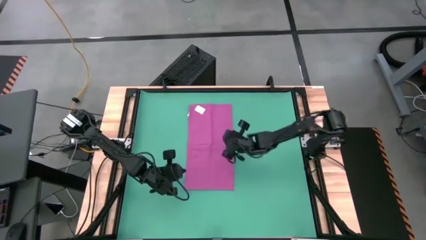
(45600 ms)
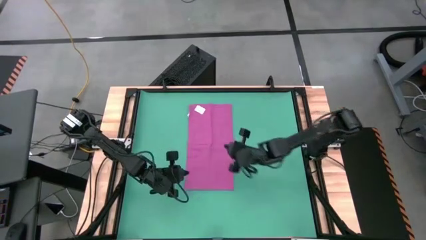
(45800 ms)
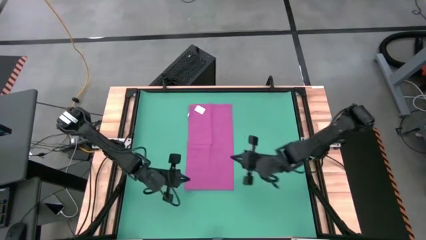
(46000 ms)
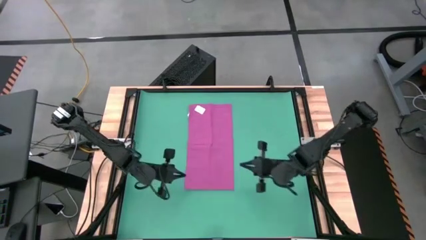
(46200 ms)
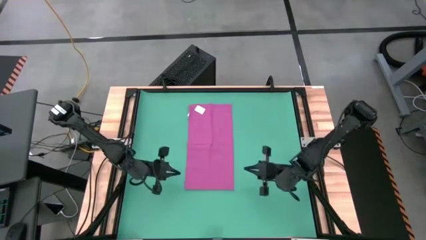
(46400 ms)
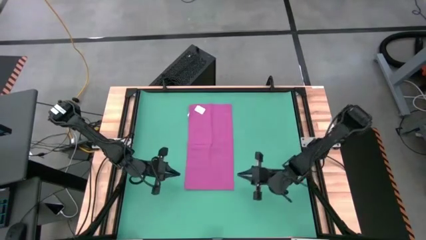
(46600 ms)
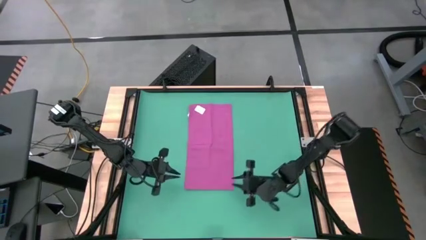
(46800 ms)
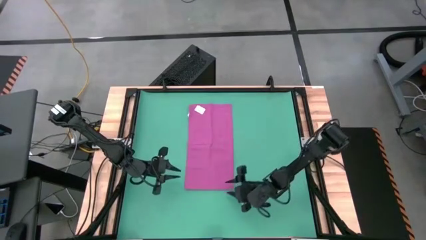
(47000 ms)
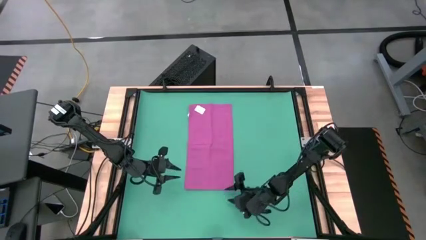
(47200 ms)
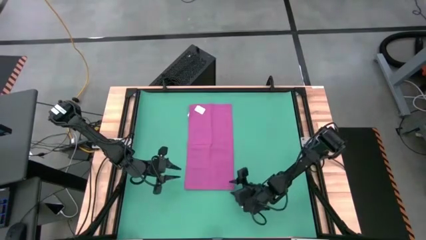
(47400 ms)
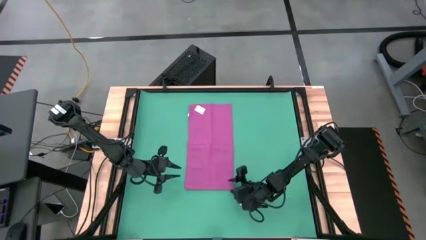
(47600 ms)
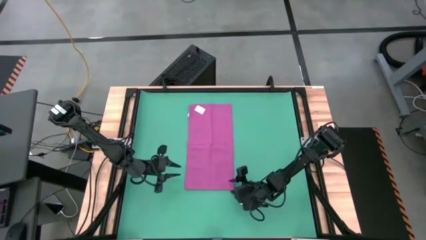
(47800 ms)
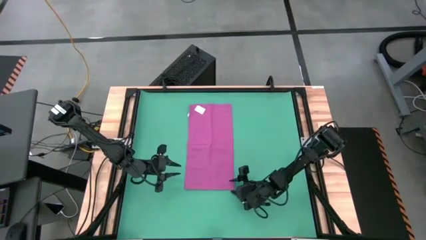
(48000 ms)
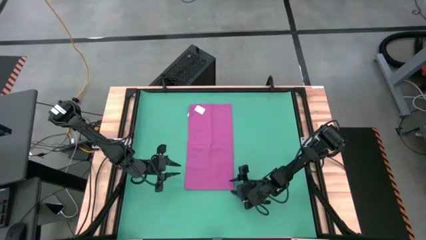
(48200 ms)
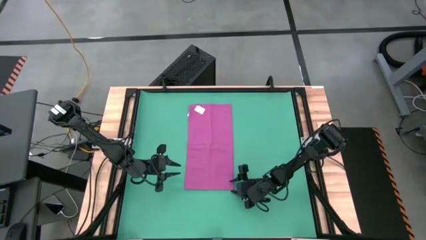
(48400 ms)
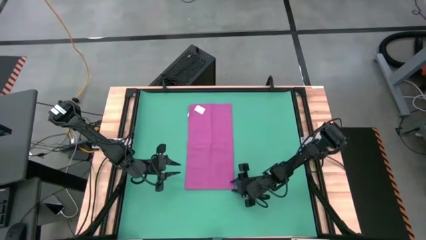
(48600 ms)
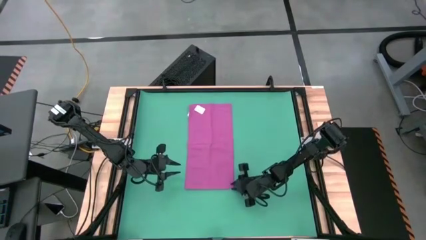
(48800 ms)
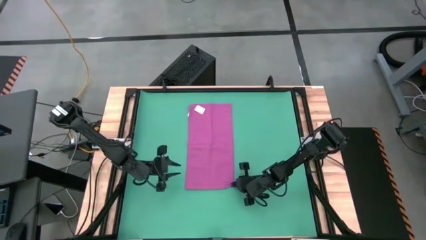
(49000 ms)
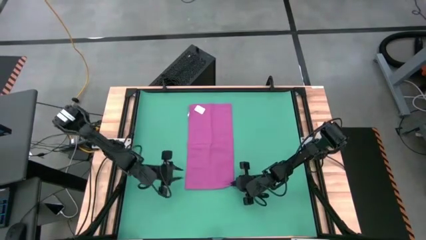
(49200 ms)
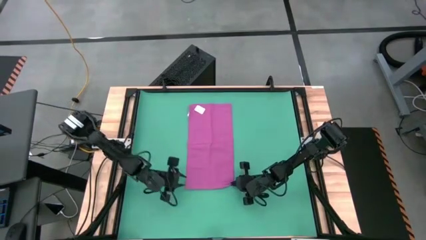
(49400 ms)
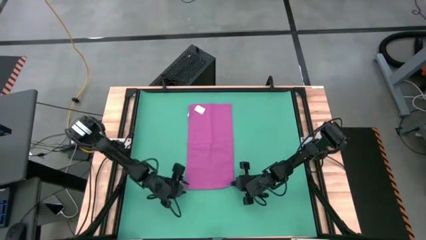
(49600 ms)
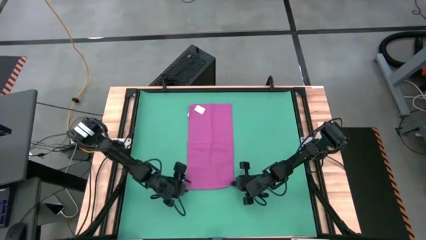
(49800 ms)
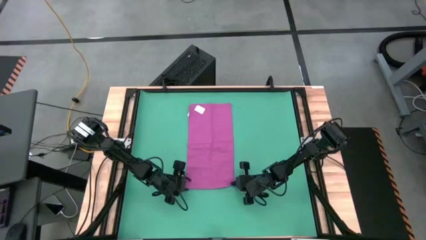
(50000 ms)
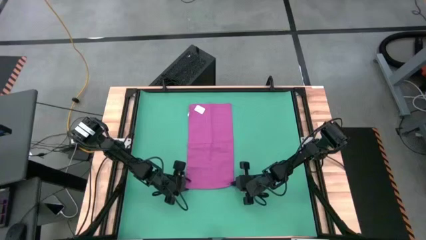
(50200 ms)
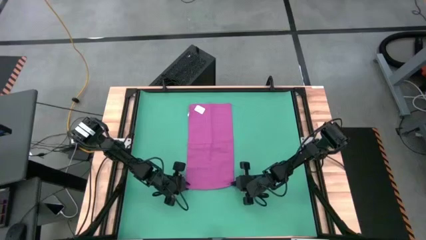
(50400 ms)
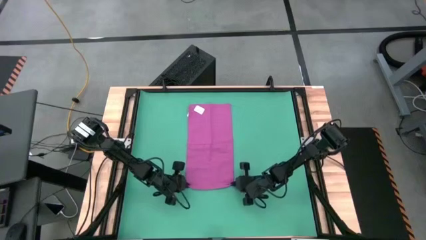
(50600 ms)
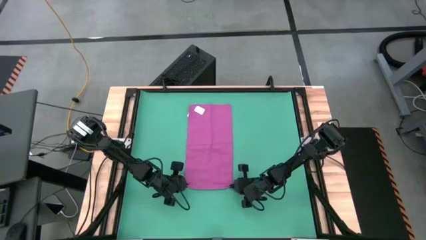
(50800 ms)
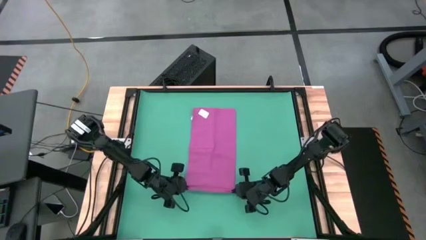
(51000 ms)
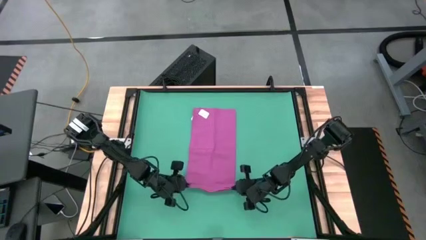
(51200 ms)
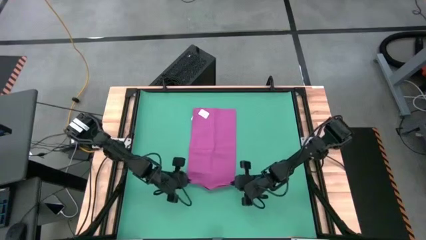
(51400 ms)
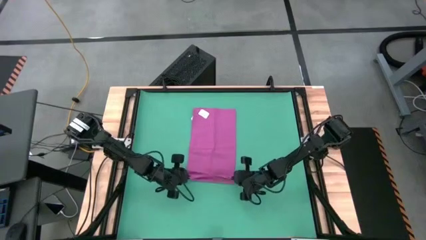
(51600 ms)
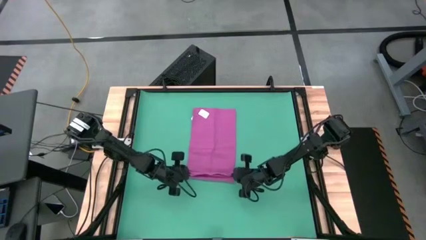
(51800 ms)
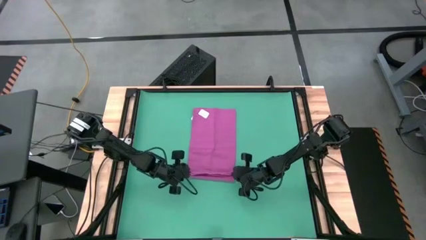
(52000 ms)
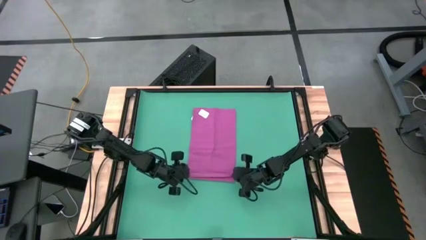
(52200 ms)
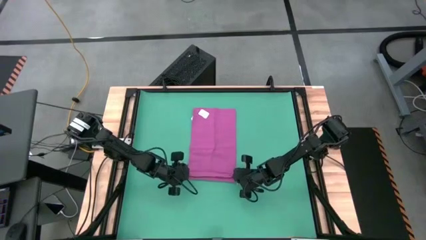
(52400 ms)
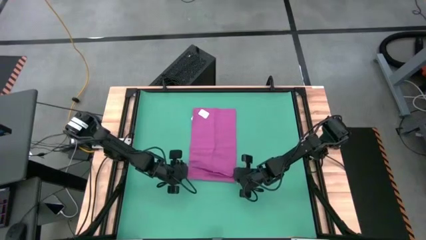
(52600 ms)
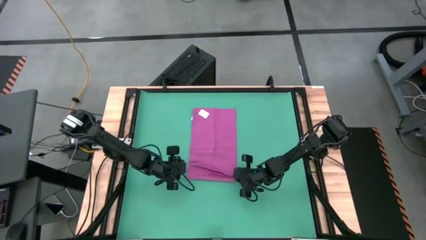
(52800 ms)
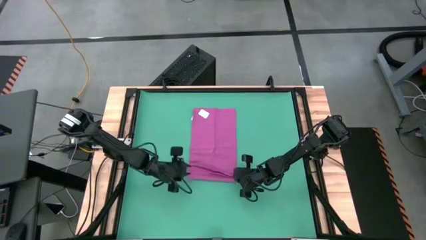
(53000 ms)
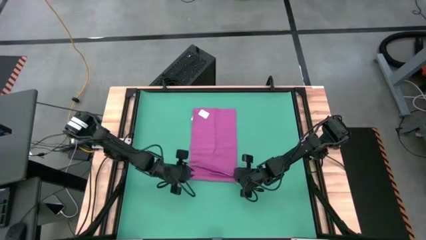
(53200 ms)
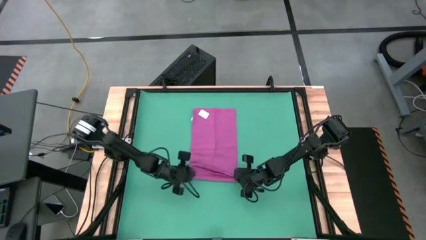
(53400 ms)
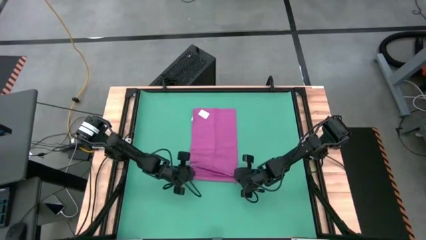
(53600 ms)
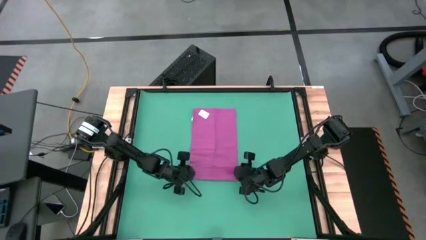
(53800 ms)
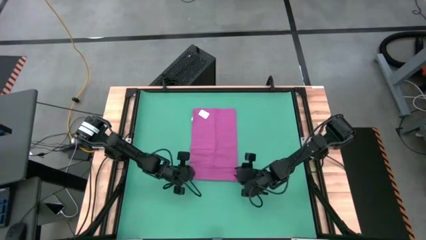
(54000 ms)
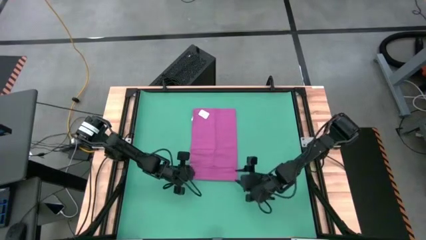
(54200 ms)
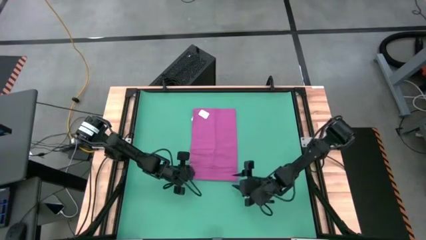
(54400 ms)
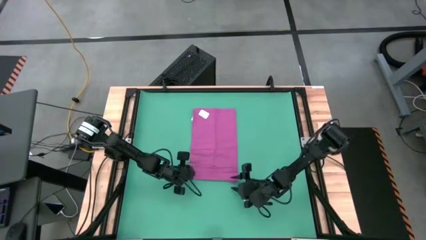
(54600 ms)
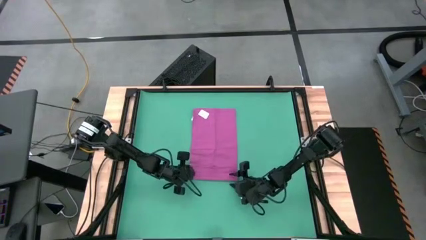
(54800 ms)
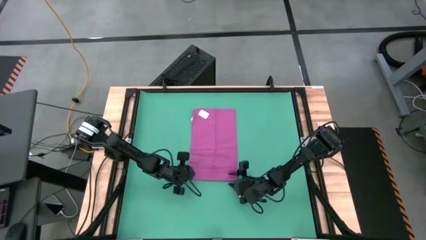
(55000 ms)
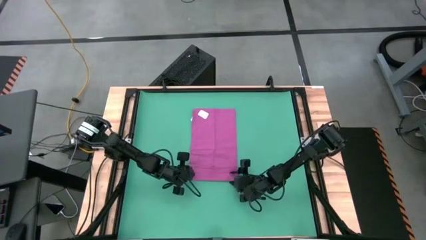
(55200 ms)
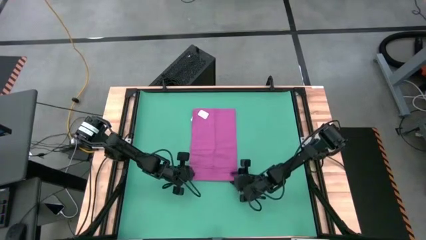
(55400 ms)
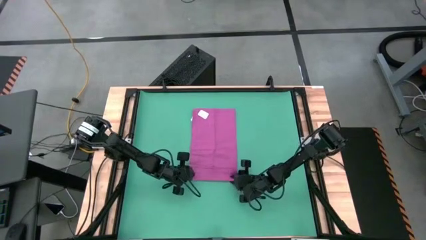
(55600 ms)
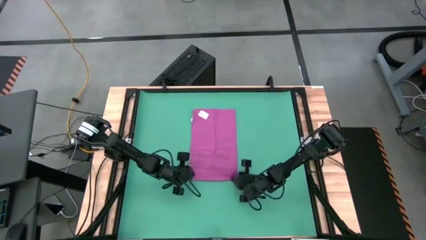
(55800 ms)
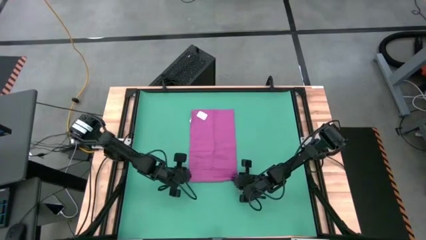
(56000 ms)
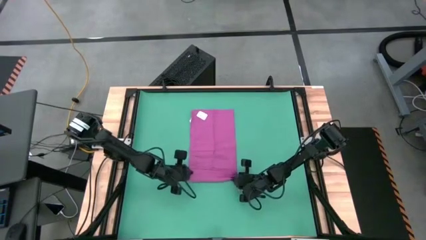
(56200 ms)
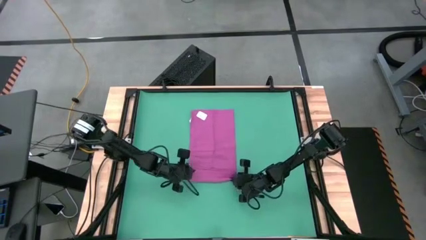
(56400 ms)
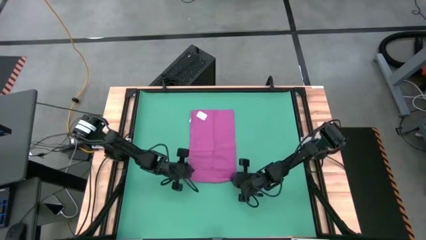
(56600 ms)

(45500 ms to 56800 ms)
Task: Roll towel
Roll the violet towel
